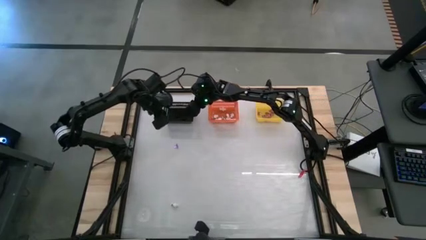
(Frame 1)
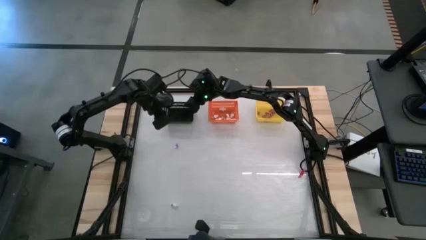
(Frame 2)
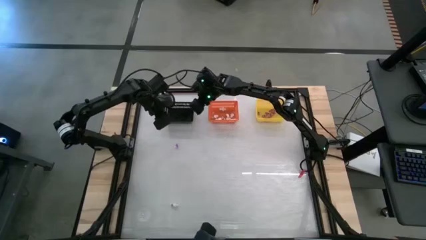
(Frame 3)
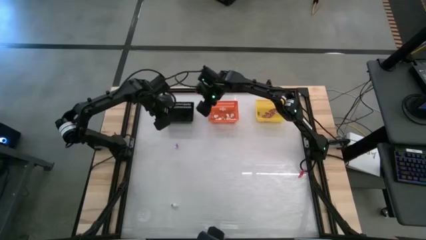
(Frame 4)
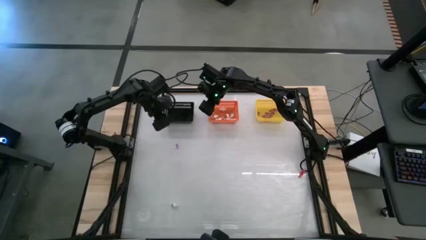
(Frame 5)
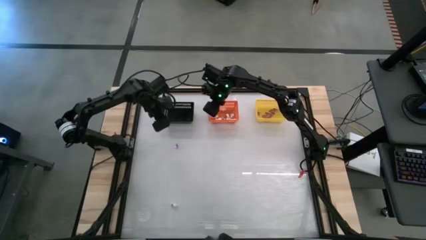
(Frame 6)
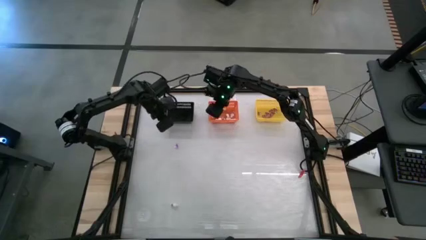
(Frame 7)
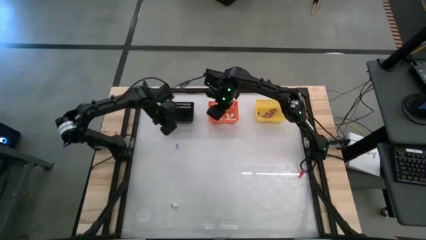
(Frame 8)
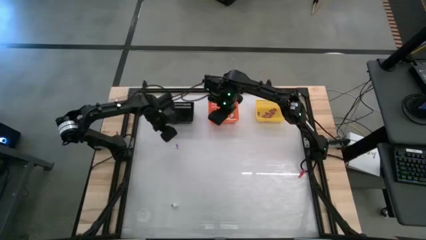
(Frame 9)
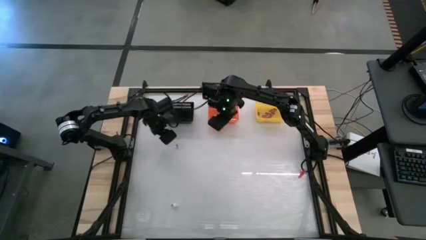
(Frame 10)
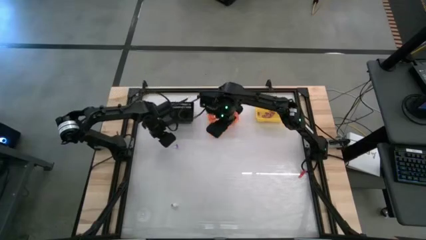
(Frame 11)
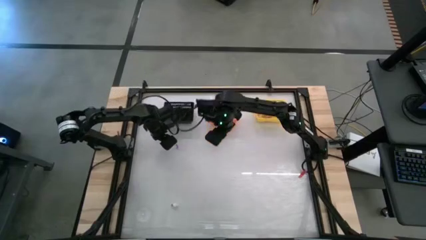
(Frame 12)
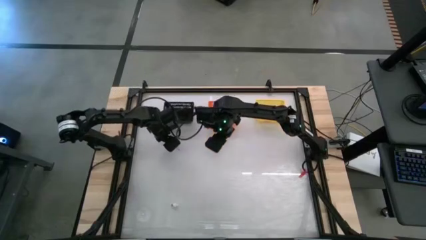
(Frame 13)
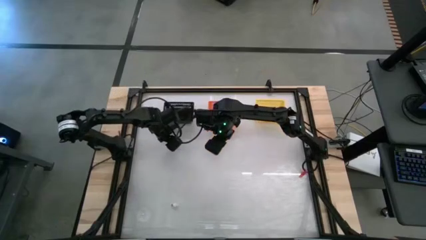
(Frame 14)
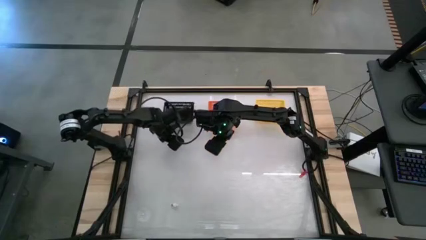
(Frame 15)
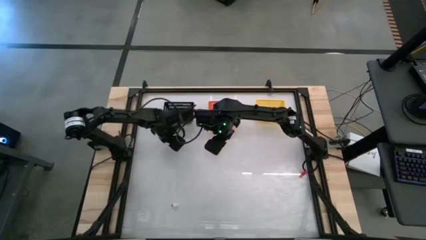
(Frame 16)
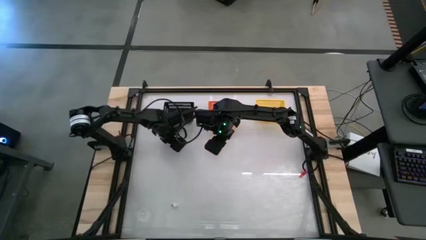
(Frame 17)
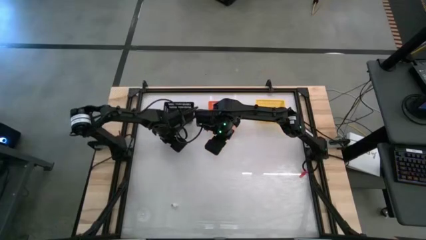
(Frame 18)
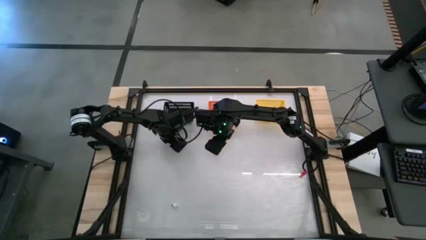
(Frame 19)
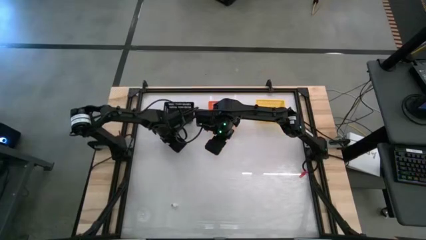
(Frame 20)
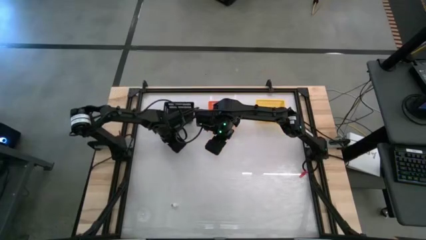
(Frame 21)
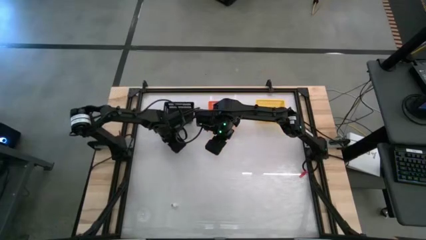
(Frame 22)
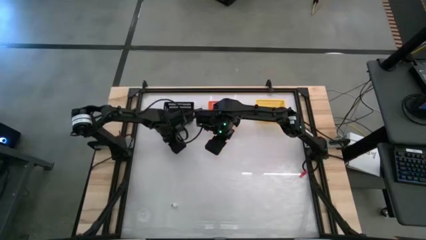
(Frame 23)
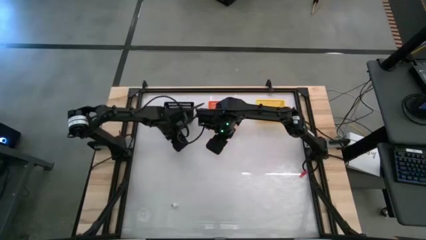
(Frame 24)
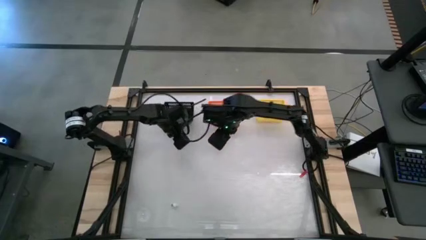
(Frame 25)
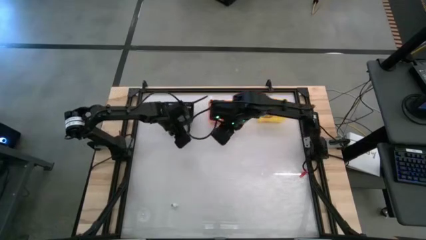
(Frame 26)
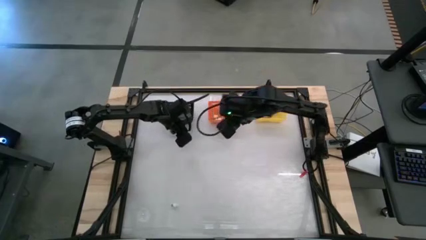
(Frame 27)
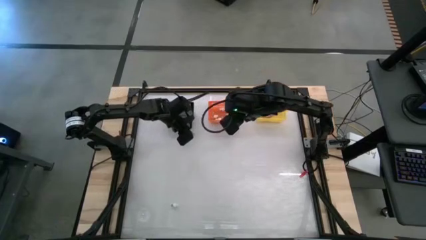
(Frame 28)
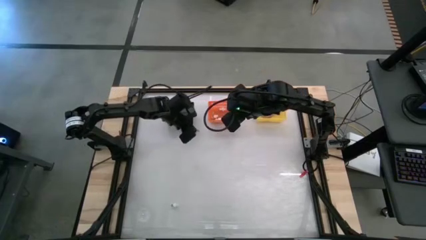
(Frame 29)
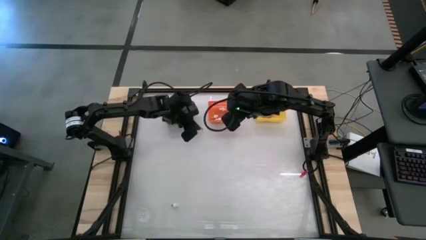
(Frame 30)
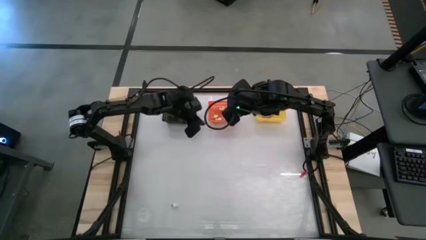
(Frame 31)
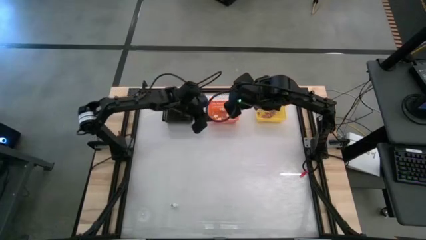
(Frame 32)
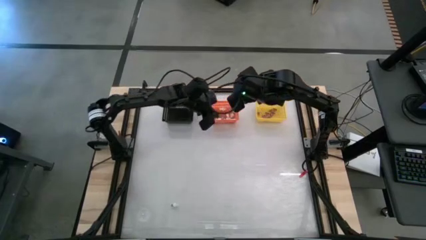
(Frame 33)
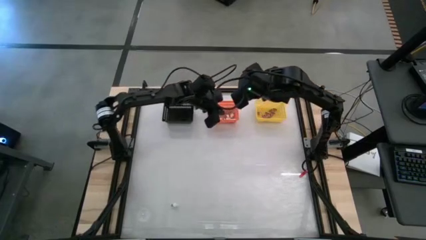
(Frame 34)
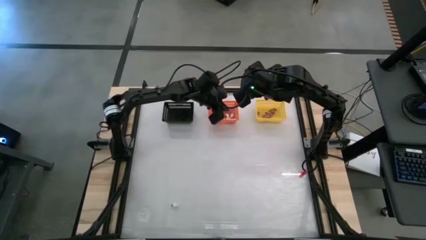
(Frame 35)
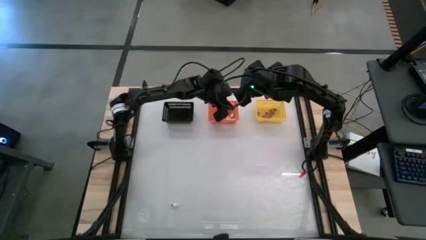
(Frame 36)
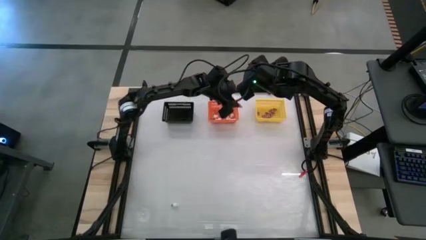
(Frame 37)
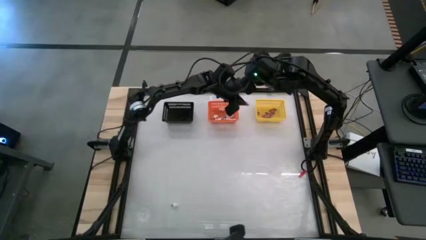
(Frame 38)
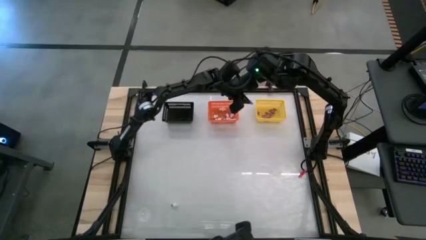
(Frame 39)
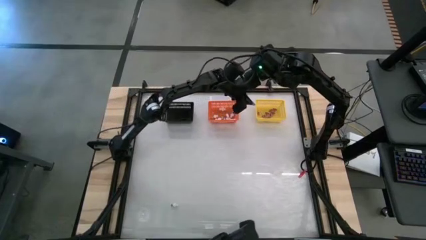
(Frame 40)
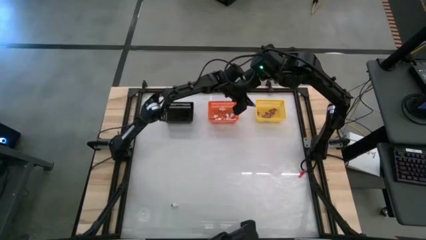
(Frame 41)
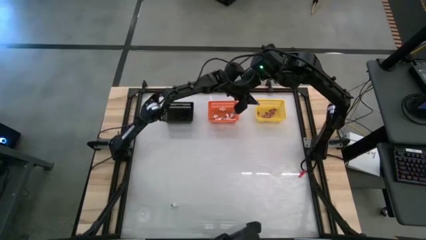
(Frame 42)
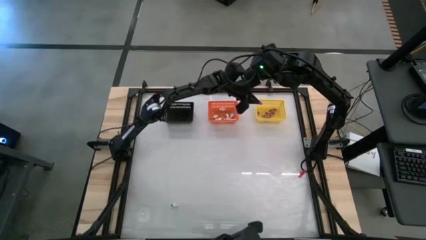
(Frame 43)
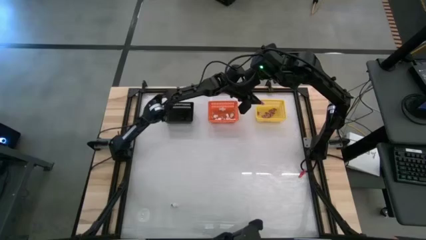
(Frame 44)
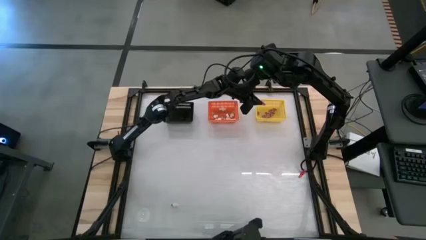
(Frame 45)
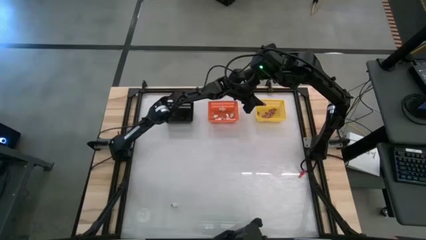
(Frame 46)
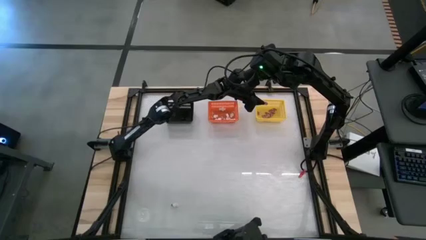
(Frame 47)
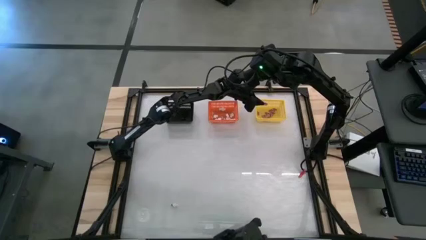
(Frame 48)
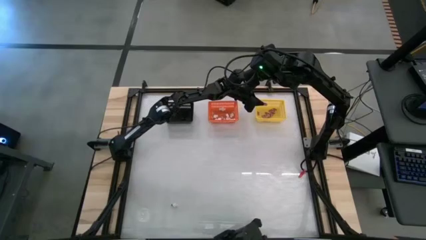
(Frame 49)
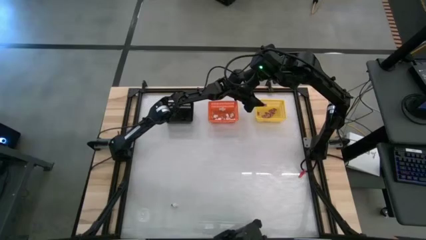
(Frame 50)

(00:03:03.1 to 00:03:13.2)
Task: Sort Halloween decoration
Put the witch hat toy into the yellow bin

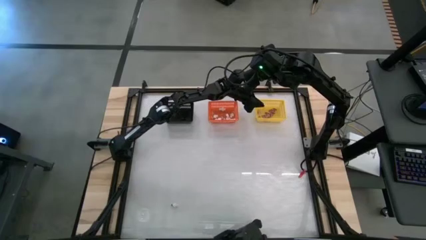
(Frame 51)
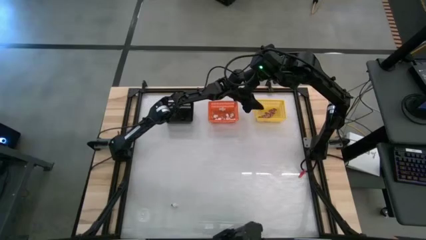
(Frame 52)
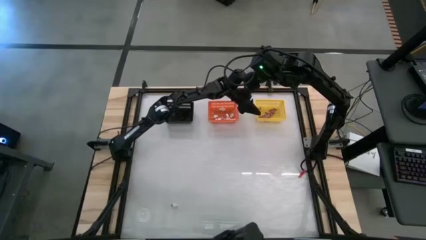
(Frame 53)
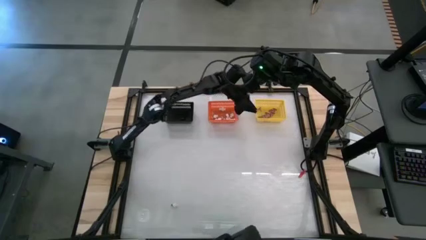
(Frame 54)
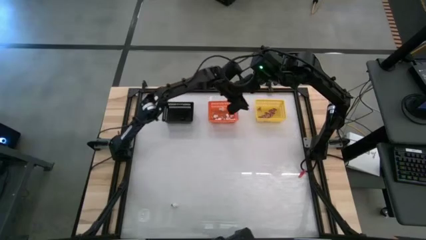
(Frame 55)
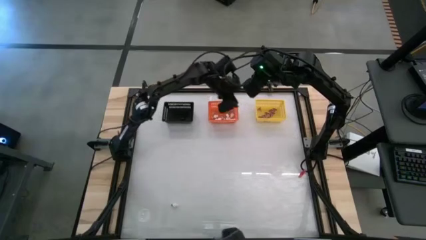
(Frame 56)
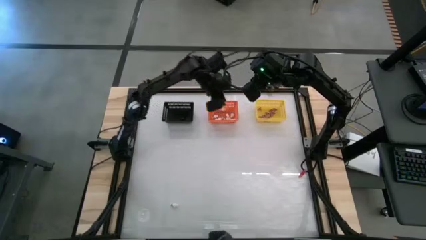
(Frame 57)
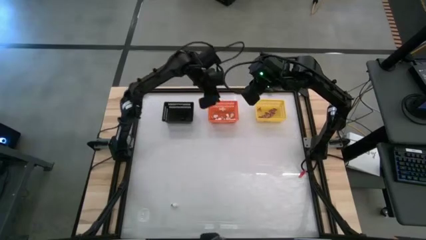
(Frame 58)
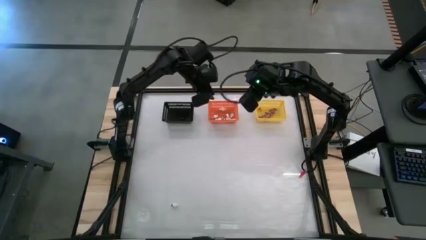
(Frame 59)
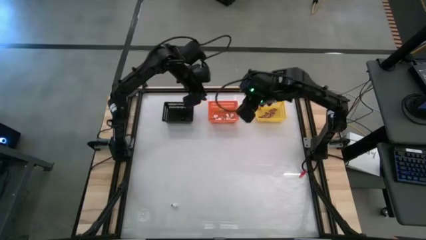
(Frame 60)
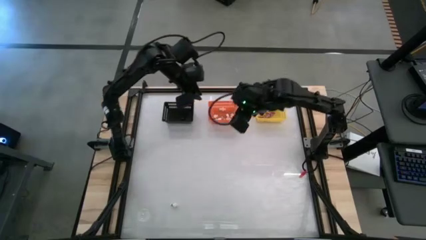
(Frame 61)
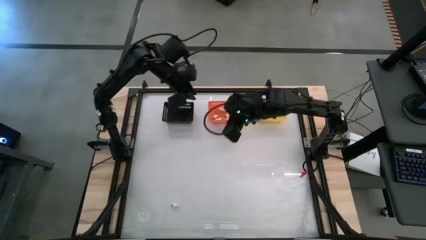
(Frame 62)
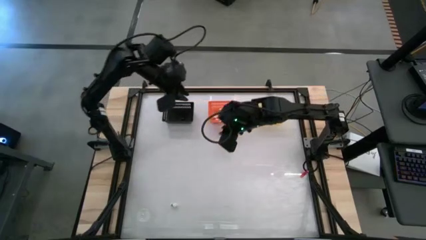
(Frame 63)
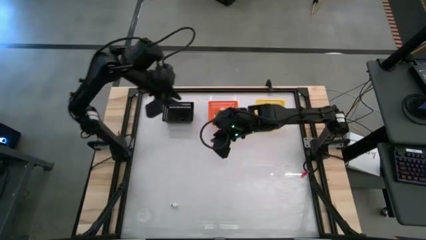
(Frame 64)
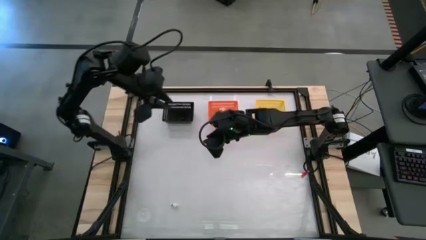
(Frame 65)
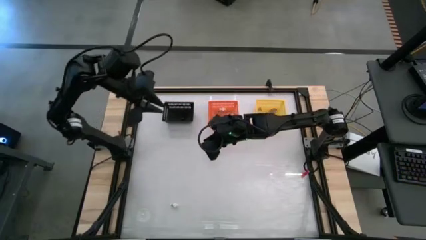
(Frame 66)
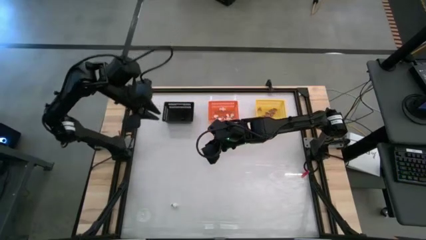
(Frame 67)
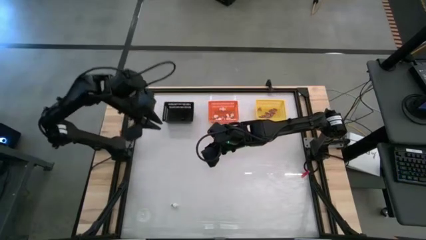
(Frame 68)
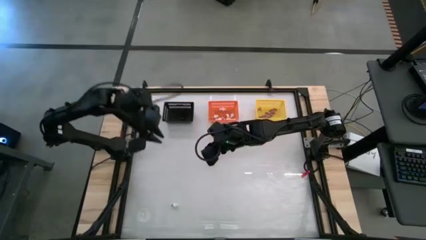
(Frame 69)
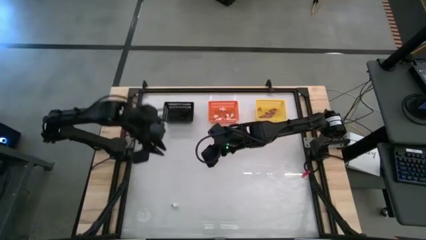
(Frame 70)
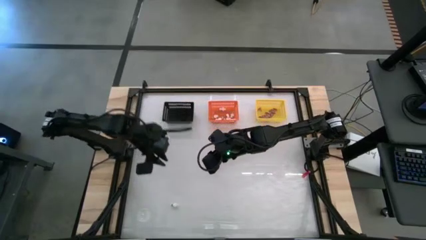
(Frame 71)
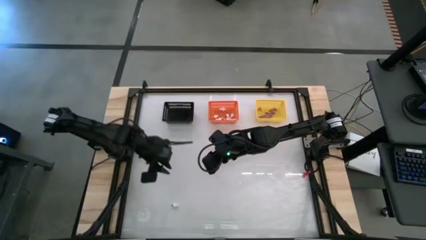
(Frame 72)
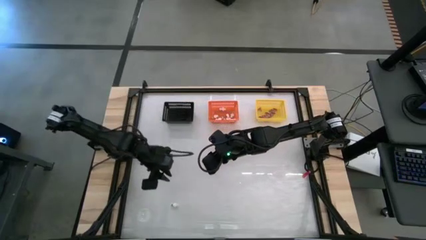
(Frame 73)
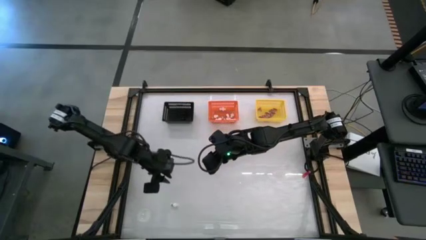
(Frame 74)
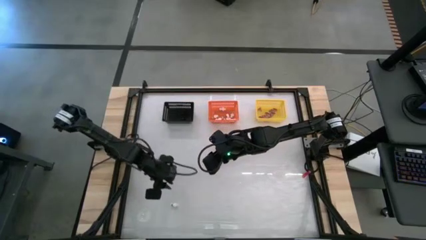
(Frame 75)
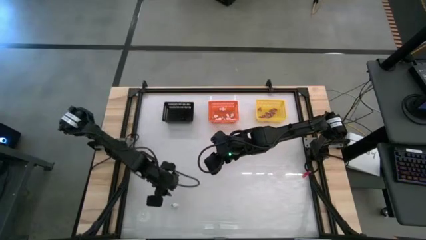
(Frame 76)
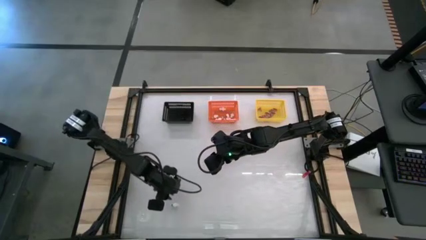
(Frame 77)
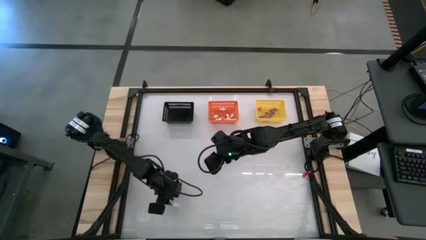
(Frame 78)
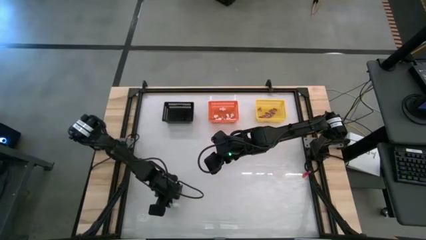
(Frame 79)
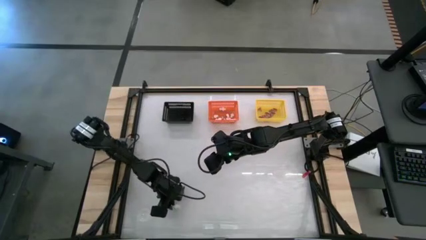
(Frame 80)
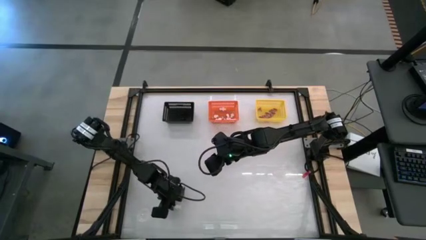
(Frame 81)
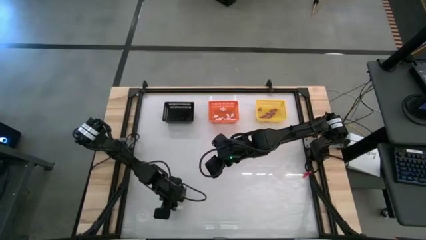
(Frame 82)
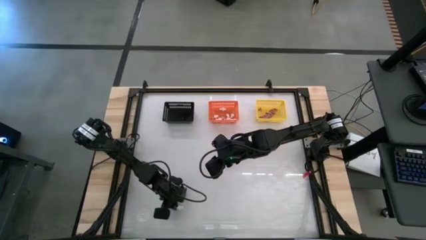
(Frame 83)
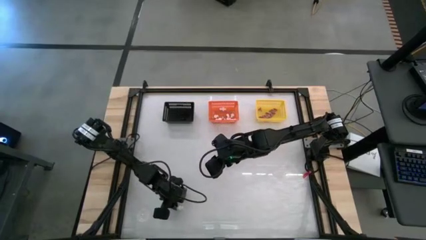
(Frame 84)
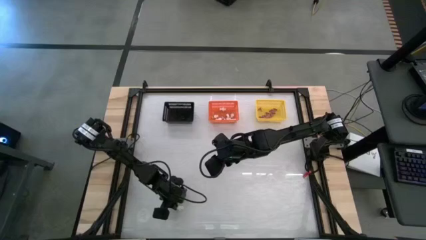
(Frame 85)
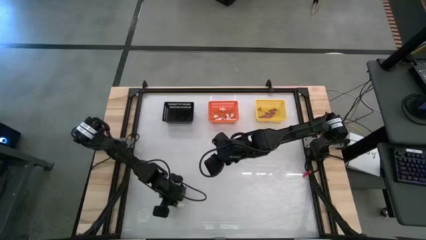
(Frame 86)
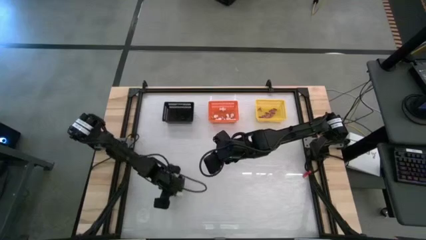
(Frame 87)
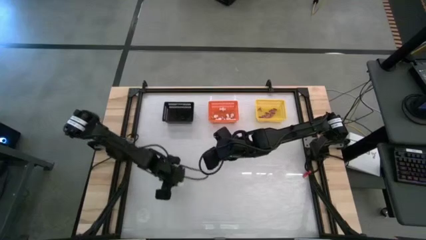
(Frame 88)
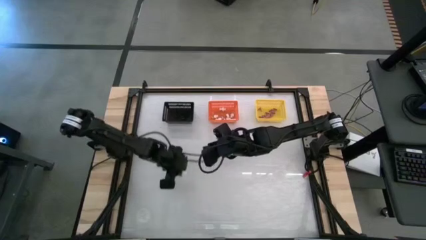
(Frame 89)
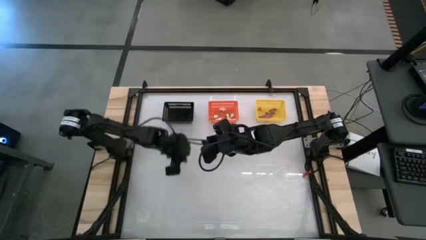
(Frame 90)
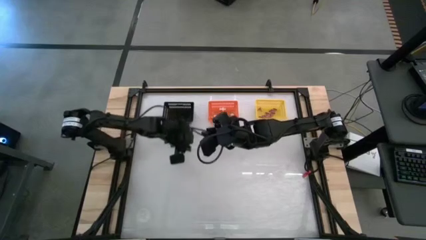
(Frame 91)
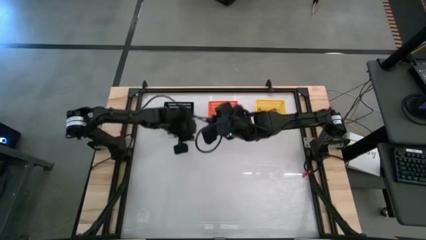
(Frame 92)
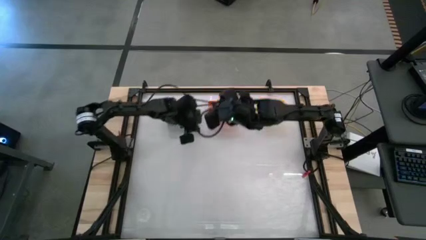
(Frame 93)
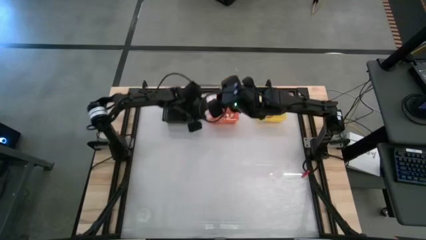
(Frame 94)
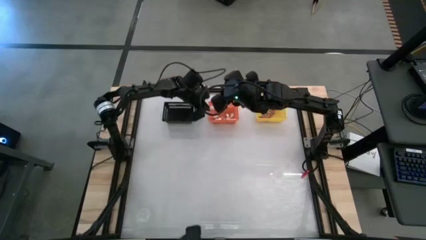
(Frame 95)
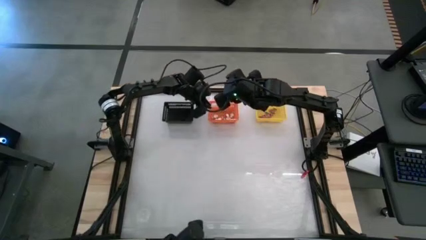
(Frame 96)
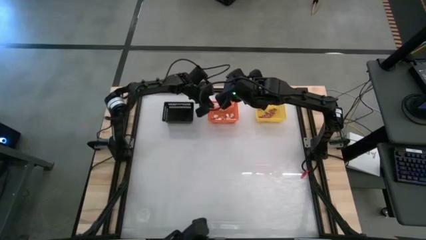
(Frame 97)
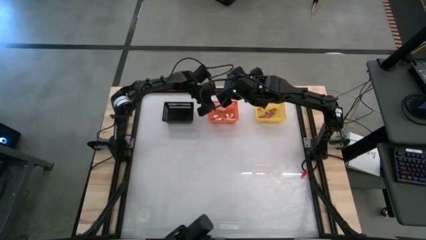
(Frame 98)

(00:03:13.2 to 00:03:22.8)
Put the skeleton toy into the orange bin
